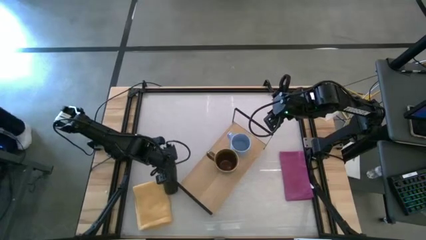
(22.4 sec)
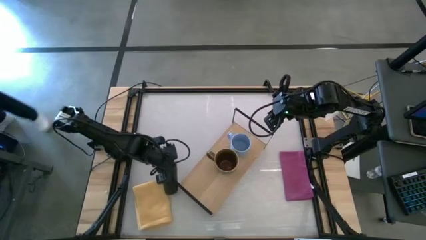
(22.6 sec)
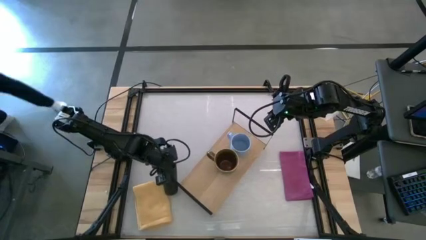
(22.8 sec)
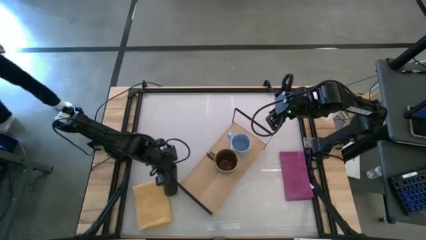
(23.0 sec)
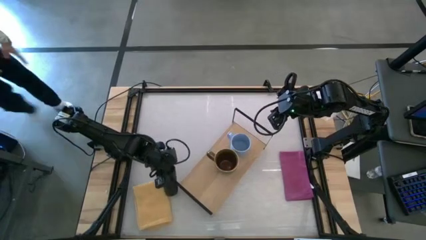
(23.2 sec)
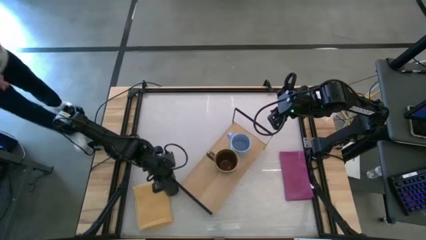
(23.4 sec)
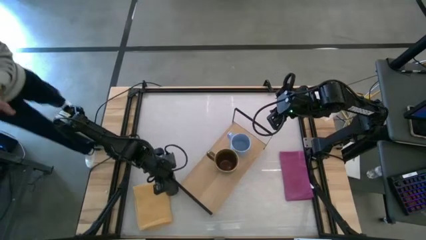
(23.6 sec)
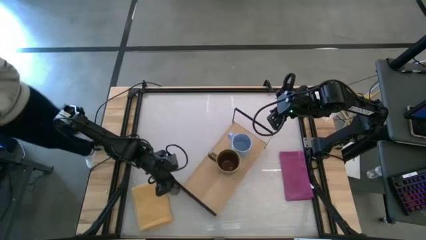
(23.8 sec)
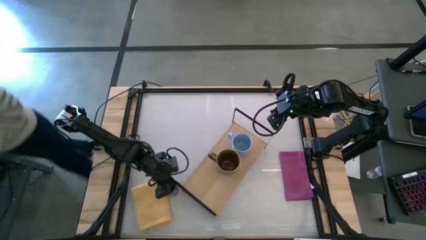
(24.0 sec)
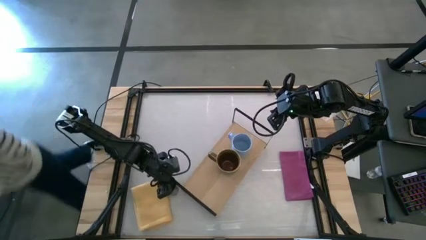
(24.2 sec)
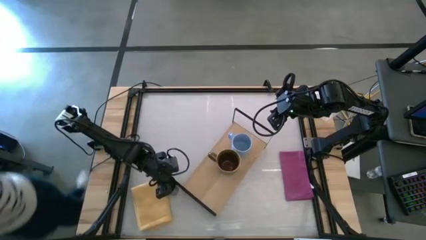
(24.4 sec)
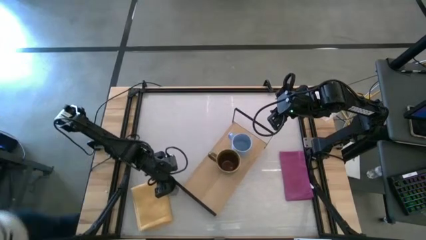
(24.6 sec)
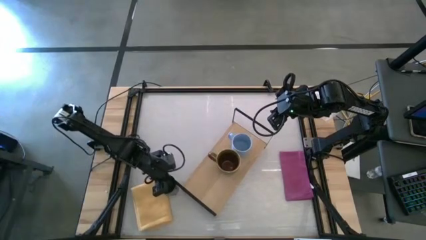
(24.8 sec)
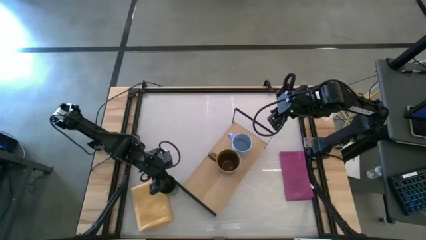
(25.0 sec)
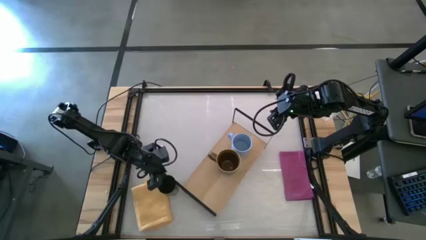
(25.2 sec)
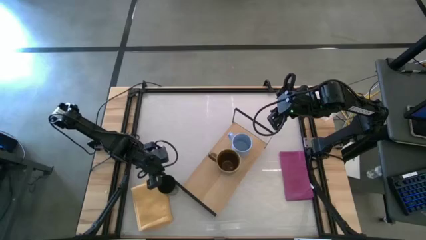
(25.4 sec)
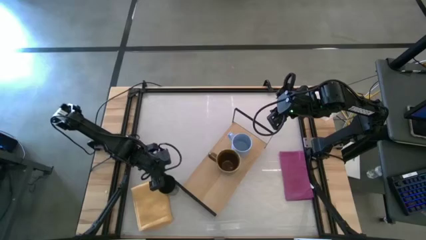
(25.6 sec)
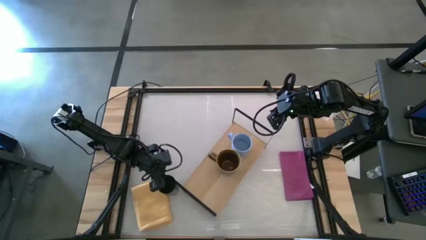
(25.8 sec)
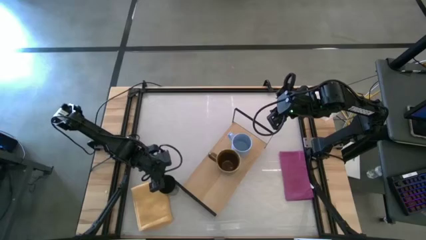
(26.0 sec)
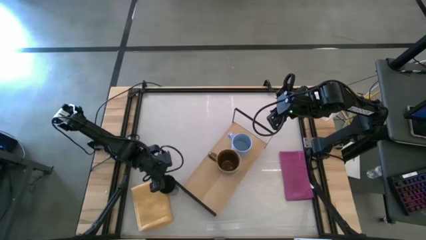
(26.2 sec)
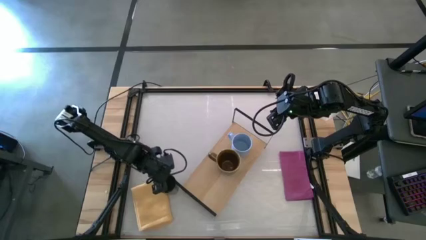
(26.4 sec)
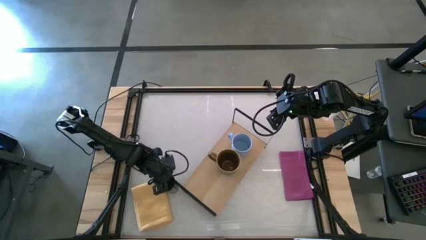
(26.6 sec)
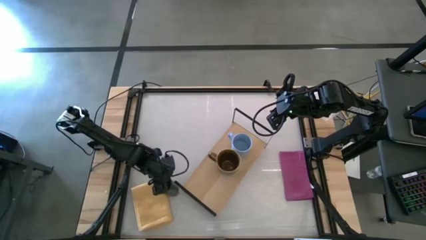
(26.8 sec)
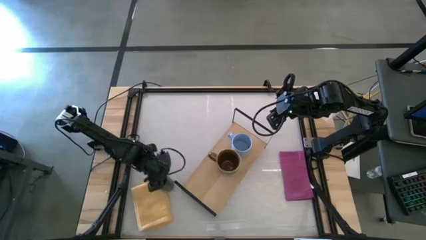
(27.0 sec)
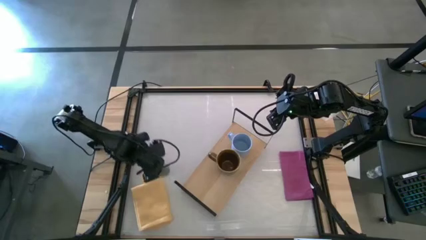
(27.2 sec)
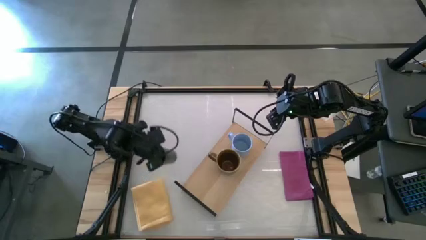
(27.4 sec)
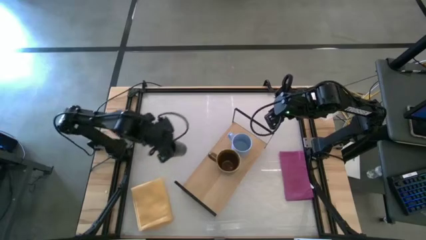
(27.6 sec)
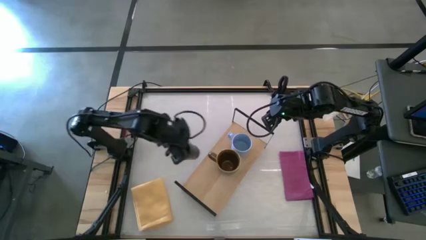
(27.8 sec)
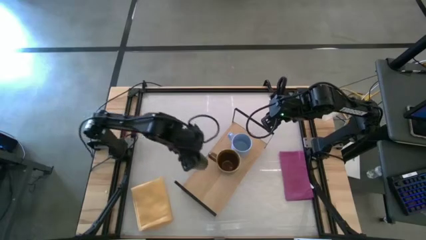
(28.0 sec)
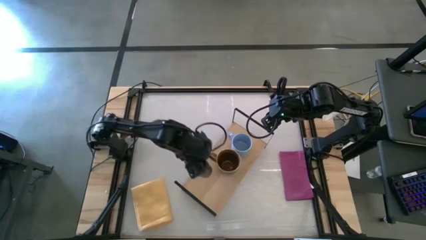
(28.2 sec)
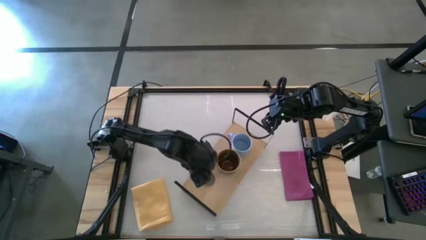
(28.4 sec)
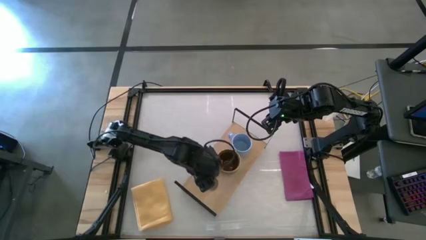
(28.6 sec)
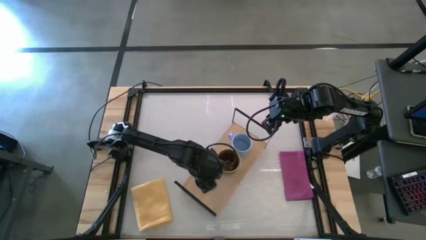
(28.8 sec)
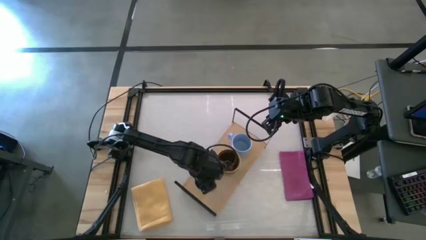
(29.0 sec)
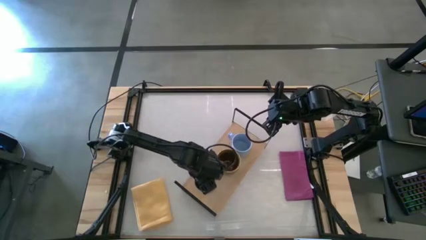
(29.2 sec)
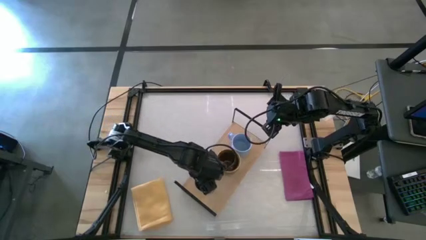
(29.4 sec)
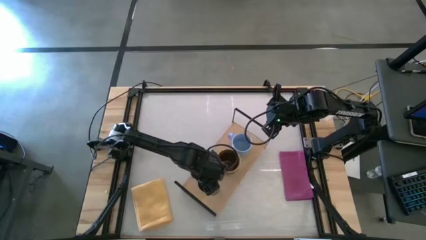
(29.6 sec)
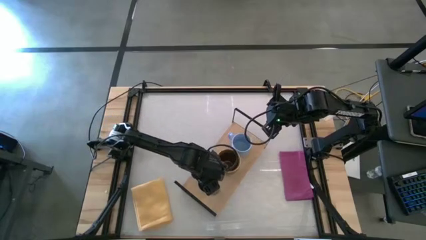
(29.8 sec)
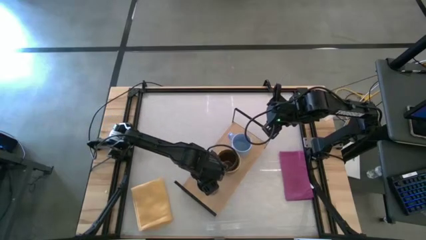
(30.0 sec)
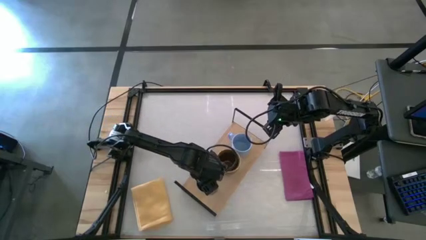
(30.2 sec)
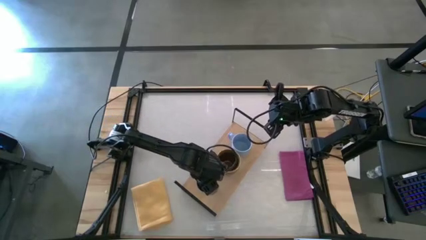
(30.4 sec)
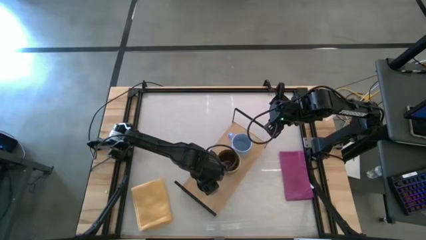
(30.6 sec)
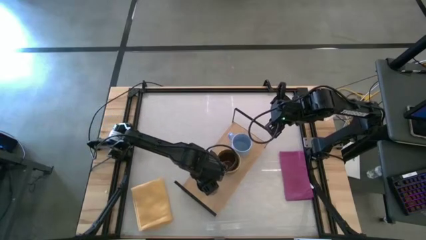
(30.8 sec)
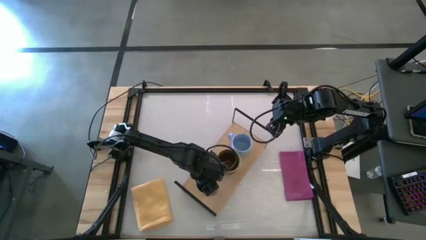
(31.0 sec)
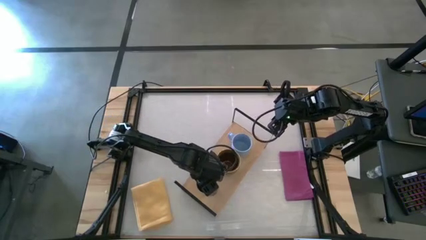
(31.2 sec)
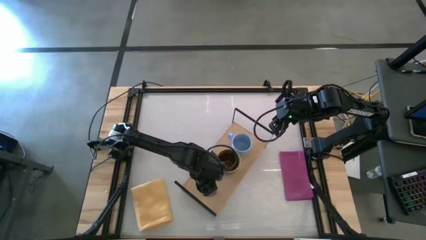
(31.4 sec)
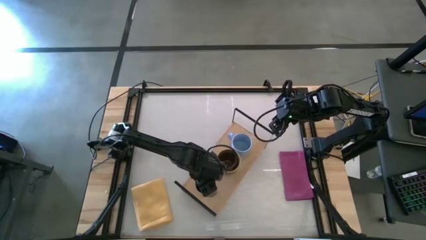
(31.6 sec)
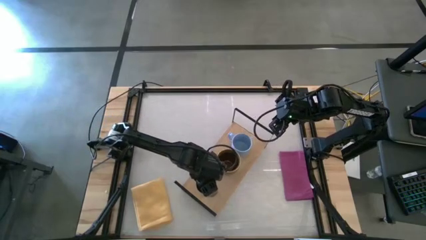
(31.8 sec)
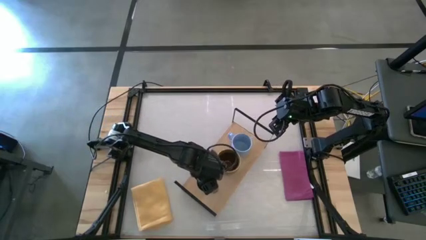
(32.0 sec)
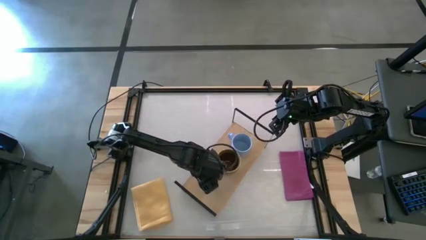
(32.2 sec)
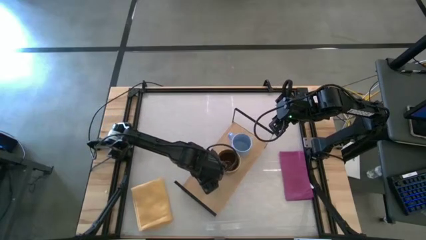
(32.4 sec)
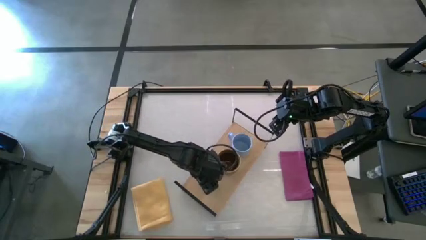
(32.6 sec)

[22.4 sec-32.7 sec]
Task: Stack small to large cups/mugs on shelf
Put the black cup on the shelf

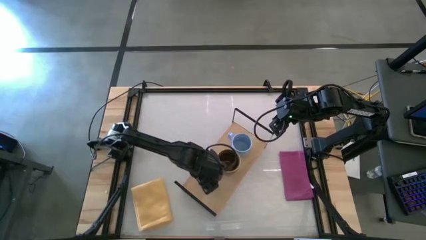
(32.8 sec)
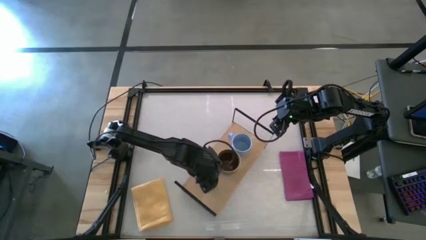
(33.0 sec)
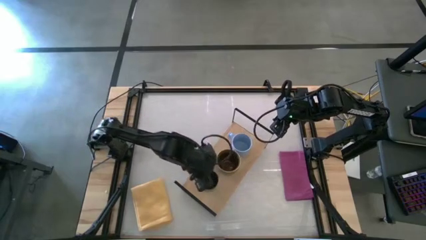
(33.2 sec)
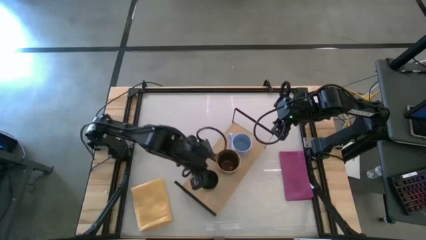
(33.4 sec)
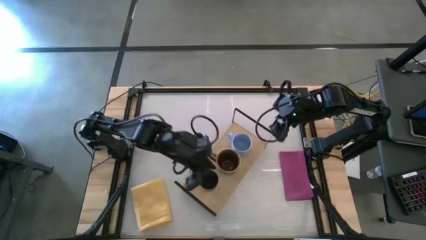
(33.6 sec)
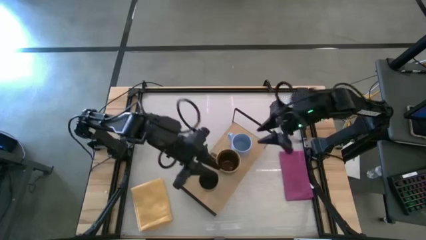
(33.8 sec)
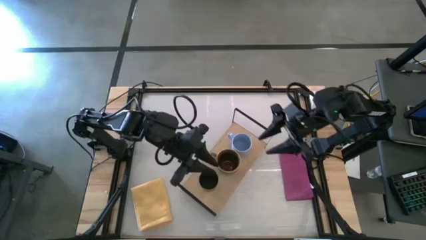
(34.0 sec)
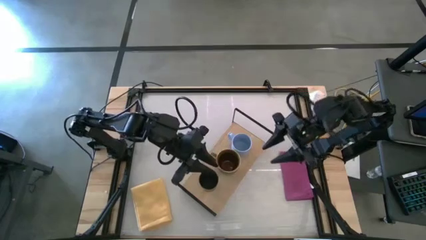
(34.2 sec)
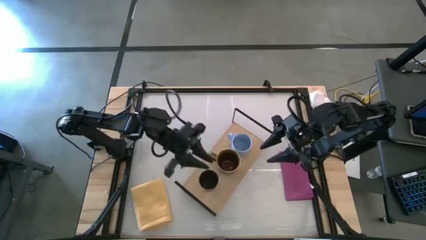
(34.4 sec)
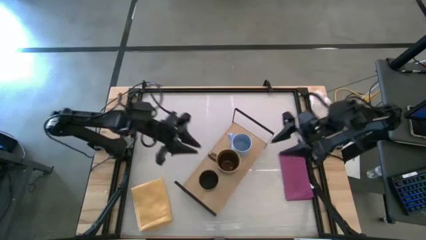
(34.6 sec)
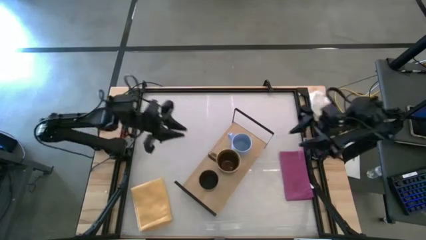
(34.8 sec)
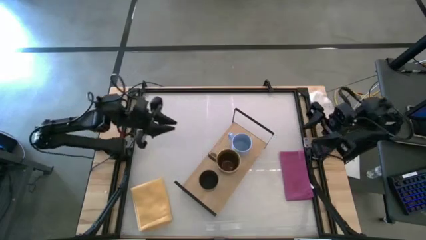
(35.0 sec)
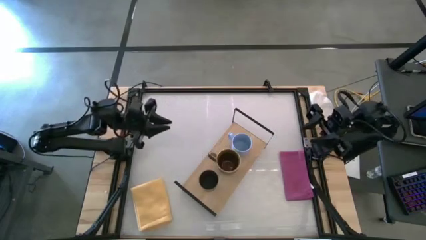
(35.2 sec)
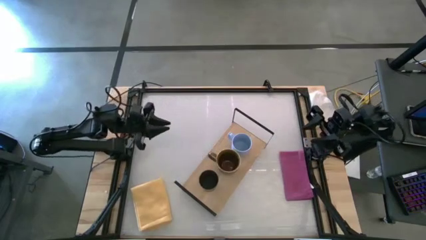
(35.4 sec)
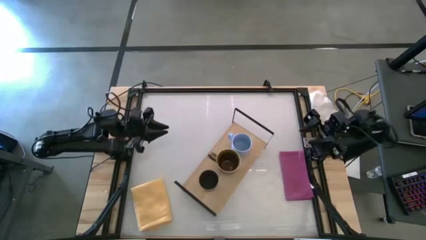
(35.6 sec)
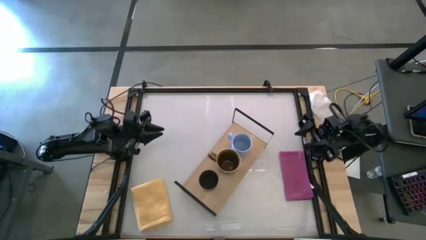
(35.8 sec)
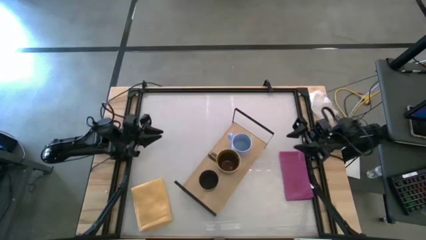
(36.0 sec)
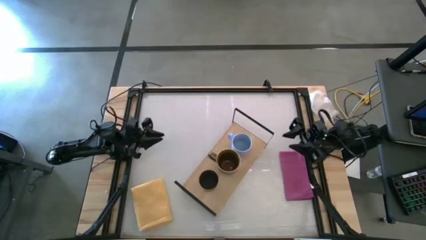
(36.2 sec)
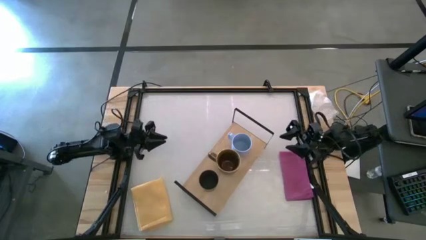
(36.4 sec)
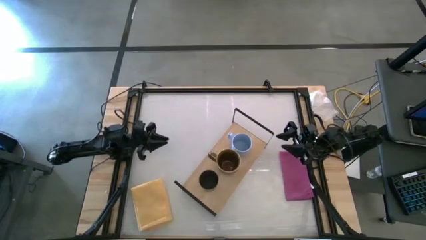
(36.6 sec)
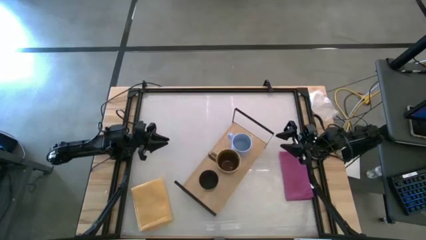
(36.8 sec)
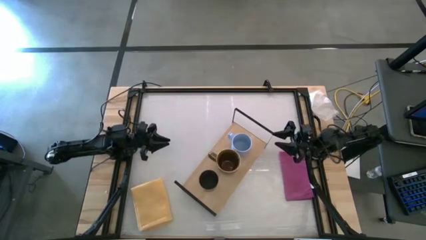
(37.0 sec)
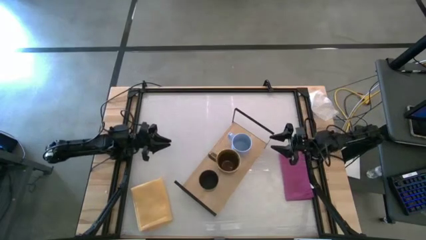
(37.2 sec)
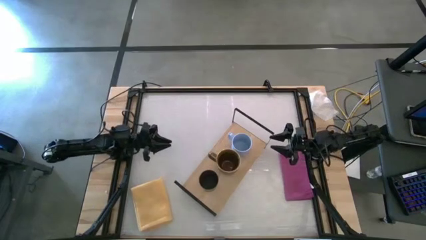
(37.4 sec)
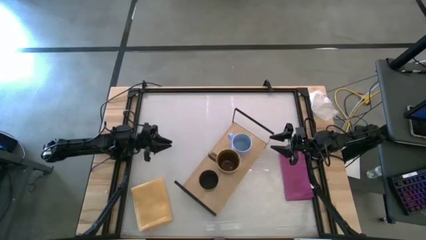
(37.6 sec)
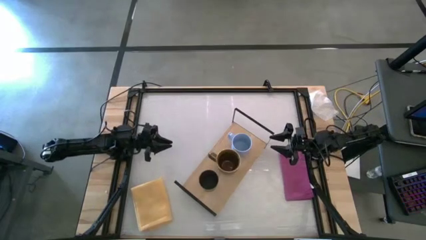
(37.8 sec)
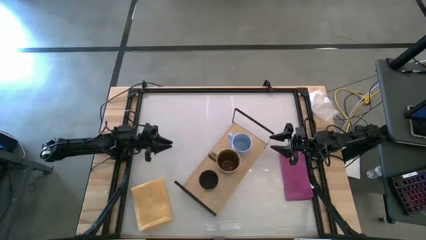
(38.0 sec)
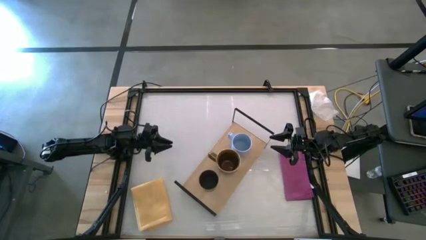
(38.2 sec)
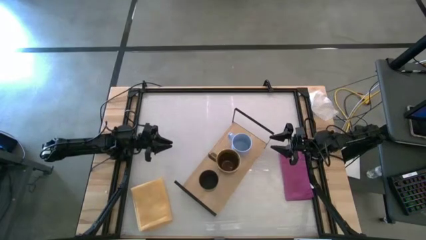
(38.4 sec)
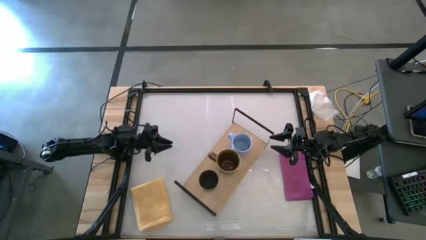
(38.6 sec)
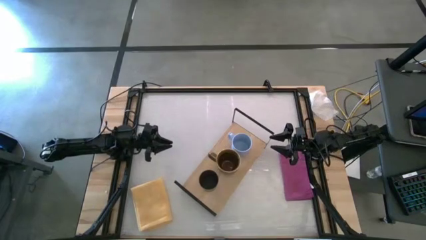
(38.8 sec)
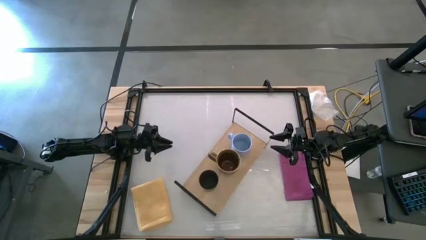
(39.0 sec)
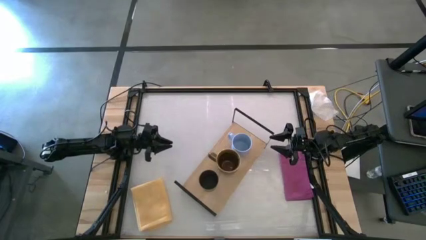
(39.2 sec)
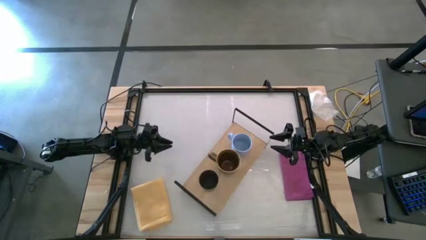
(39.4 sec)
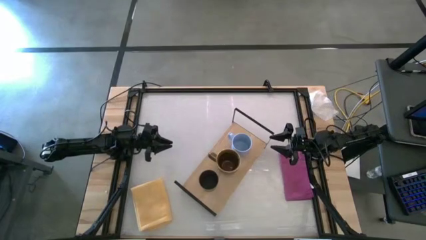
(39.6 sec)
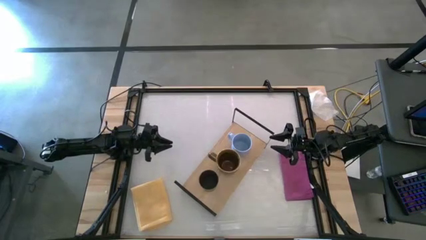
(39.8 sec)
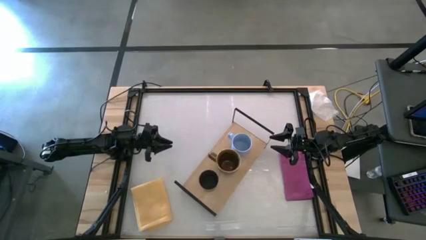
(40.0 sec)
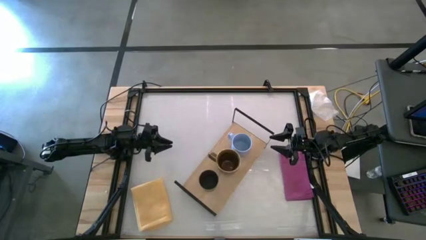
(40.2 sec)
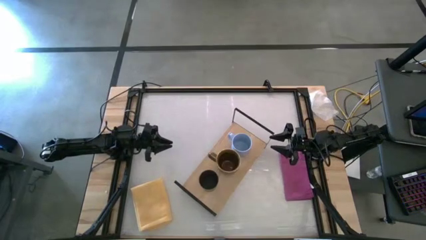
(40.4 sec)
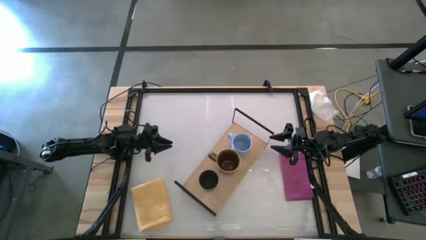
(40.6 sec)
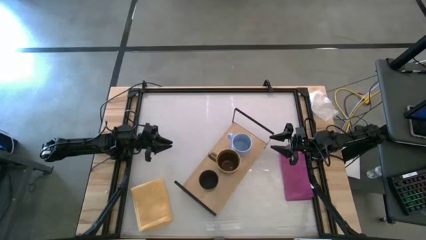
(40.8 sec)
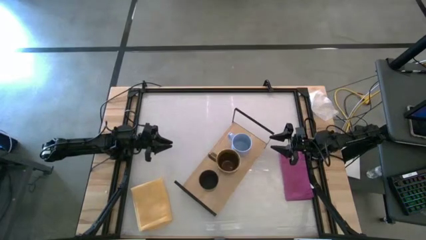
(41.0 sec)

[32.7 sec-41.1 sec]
Return to Home Position
